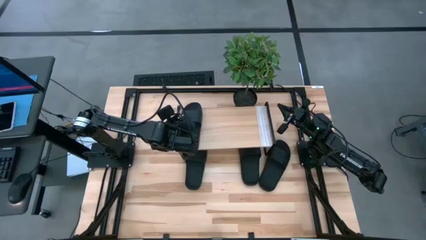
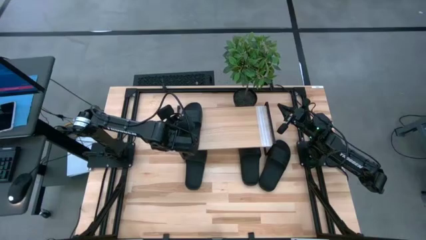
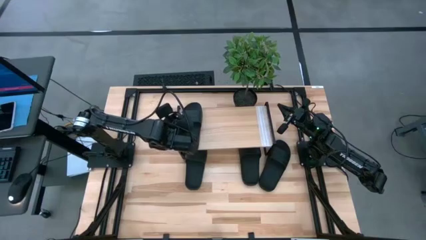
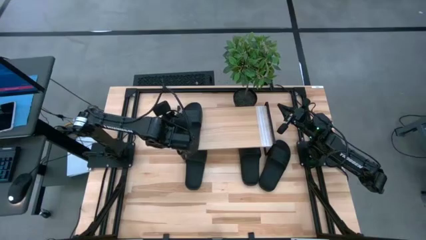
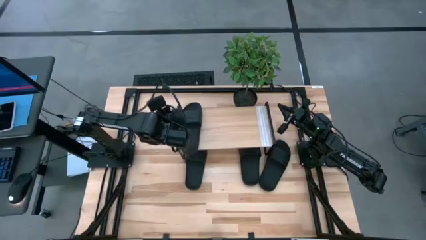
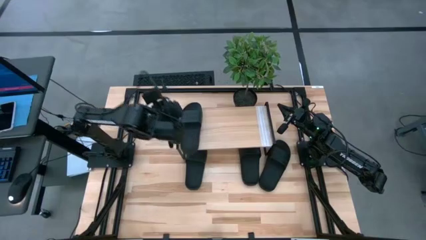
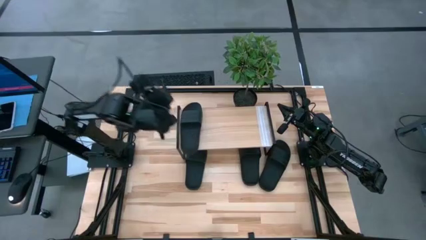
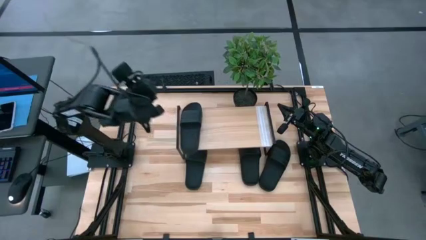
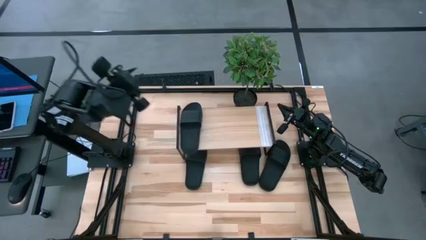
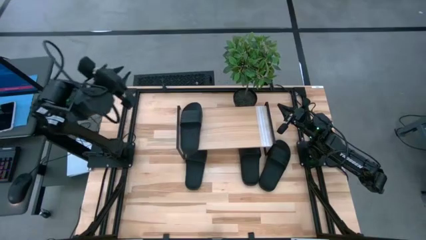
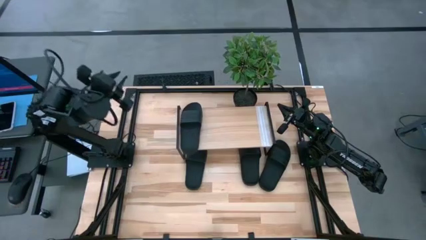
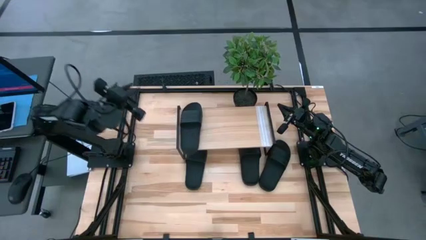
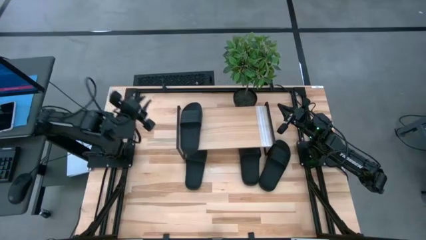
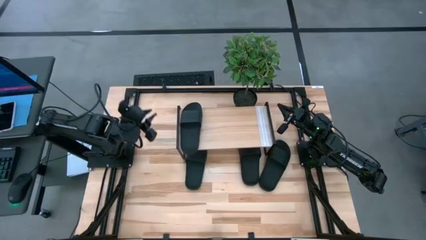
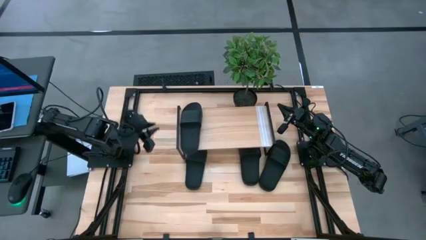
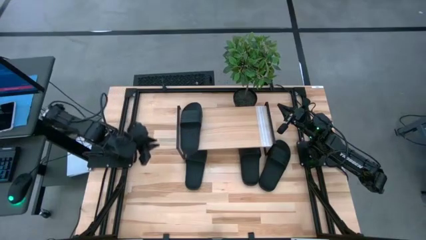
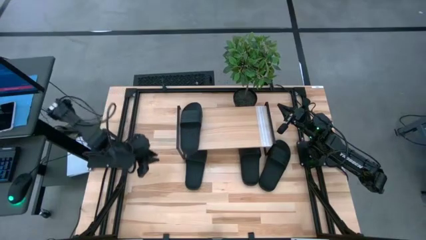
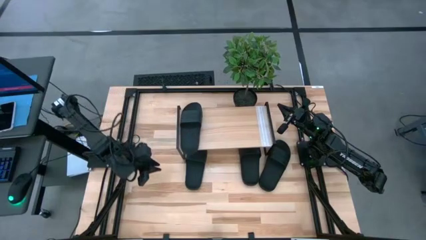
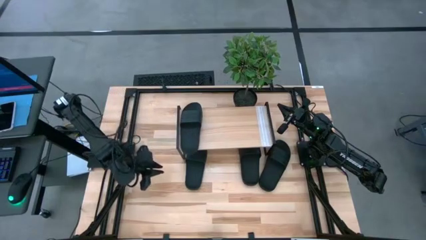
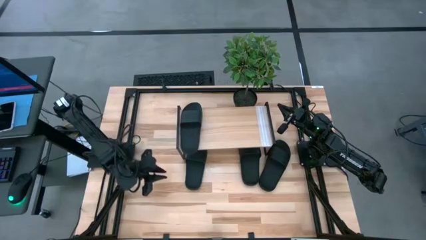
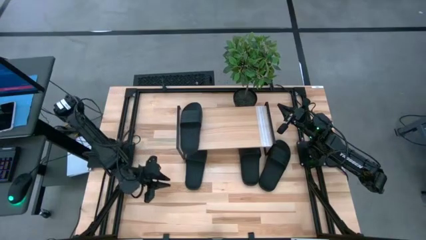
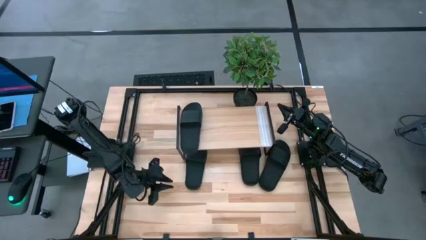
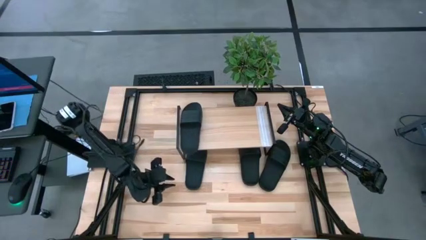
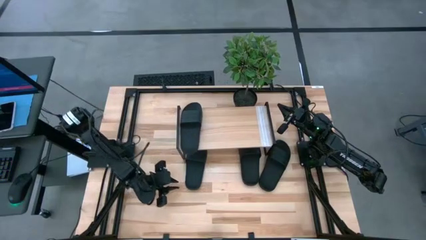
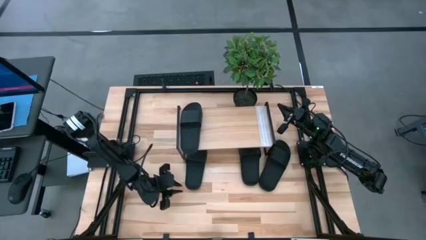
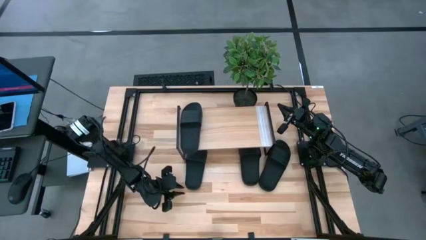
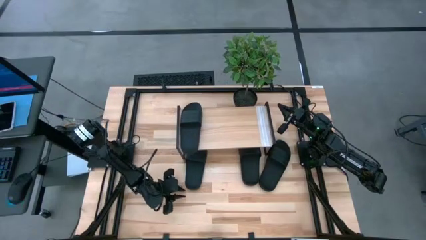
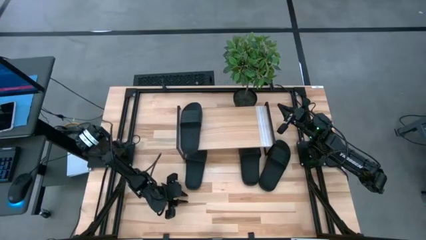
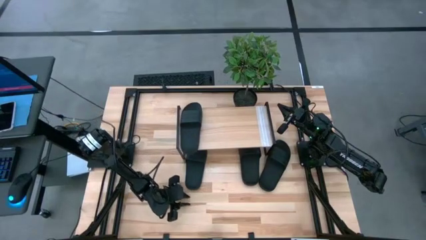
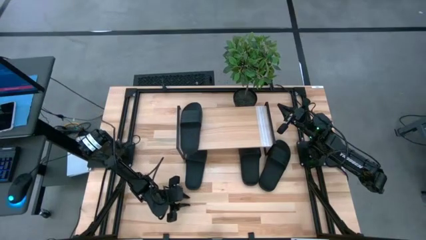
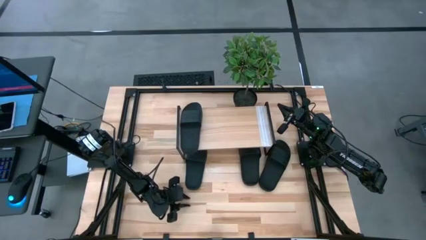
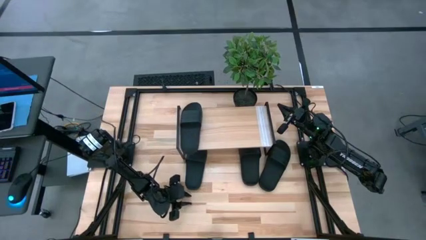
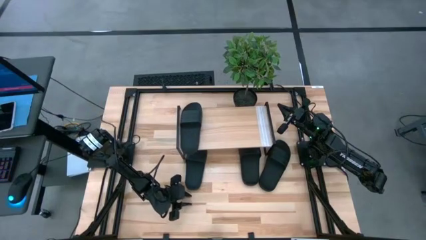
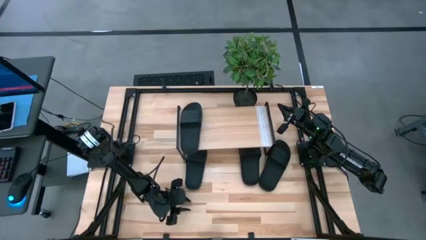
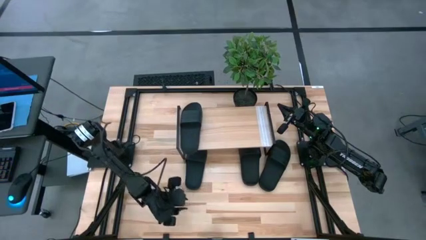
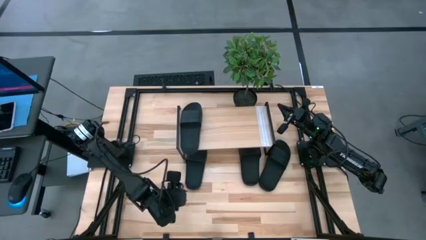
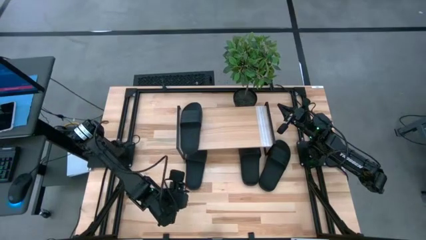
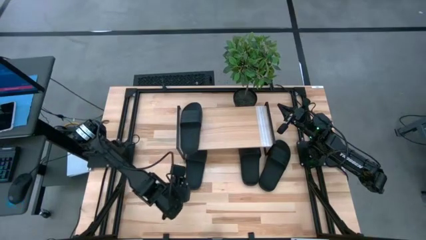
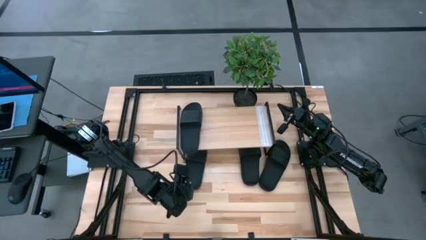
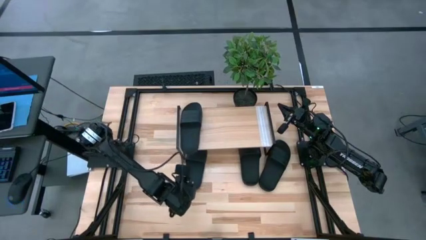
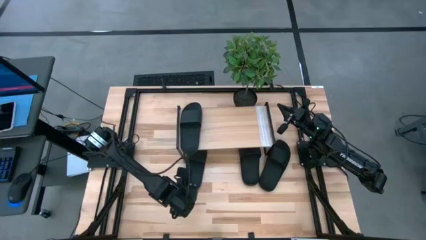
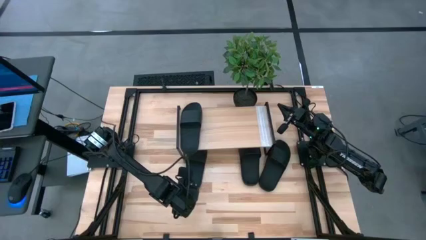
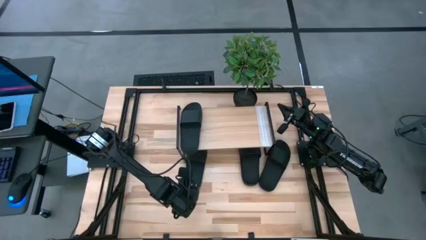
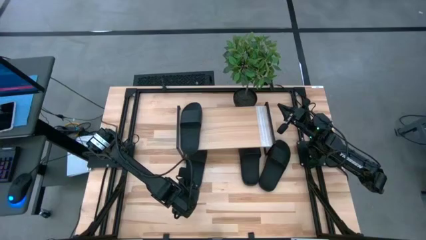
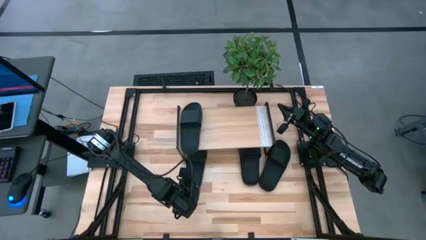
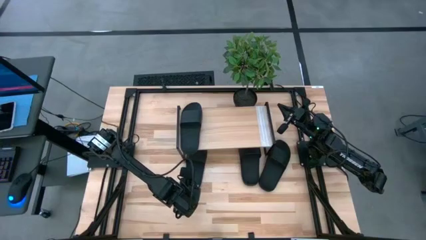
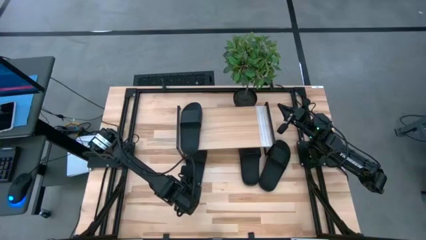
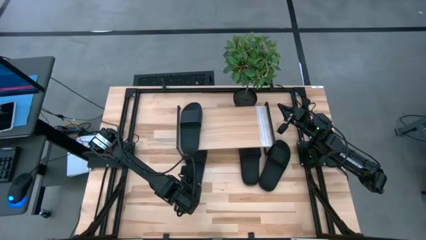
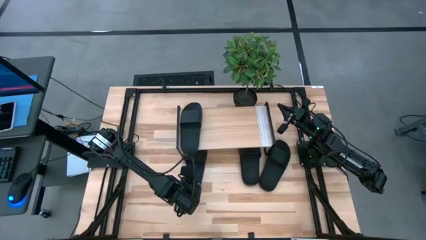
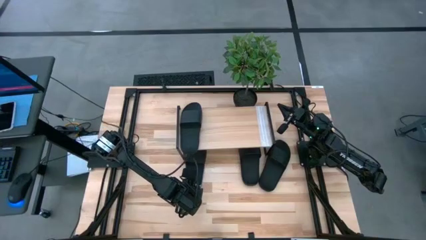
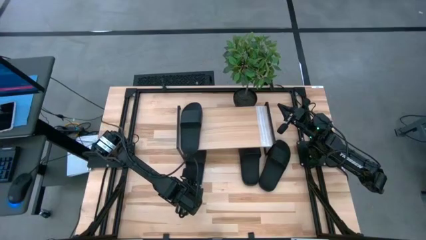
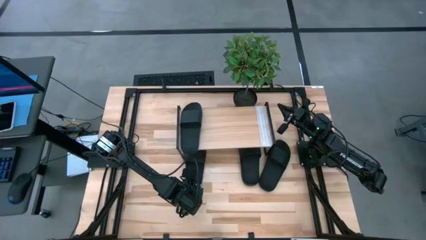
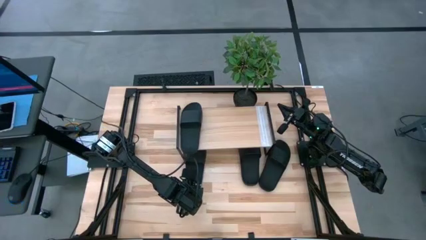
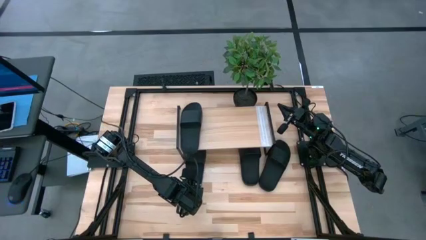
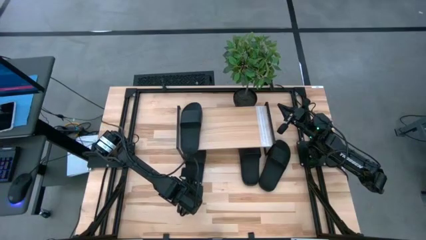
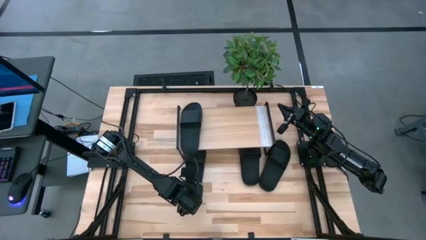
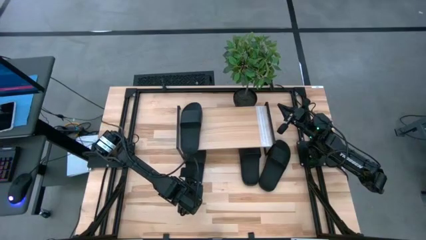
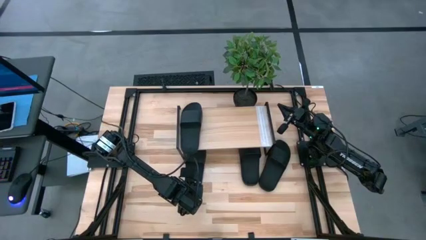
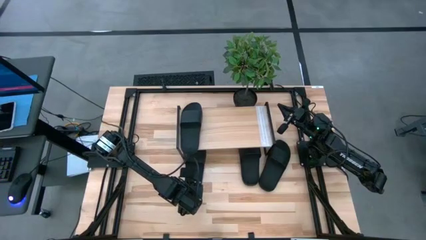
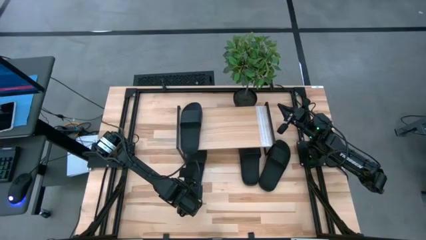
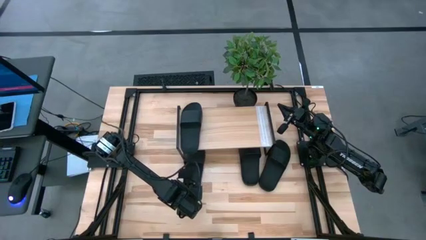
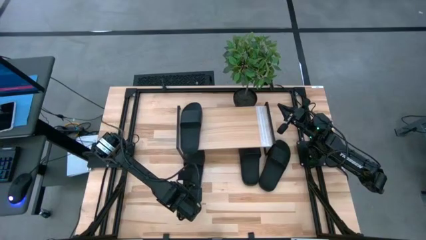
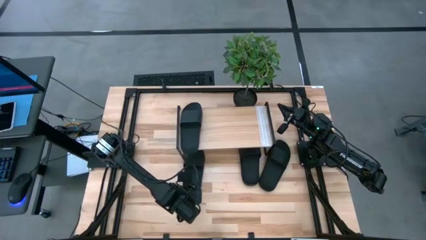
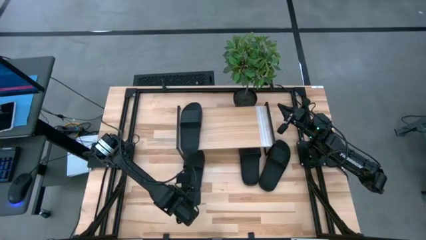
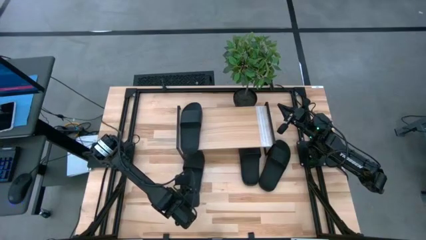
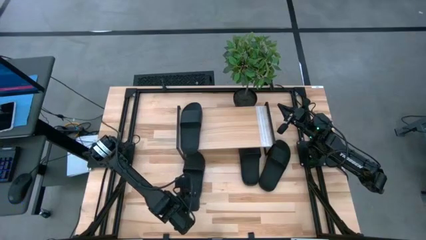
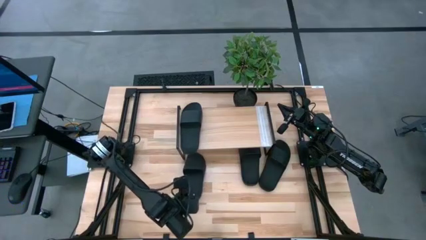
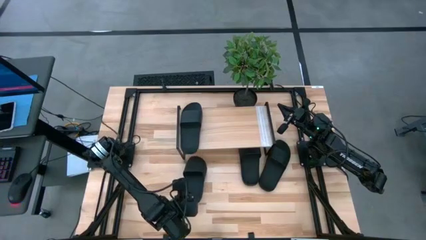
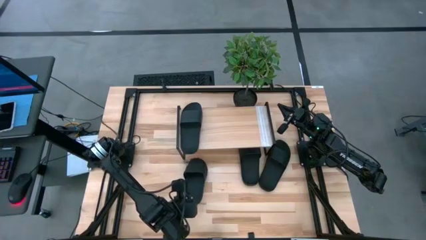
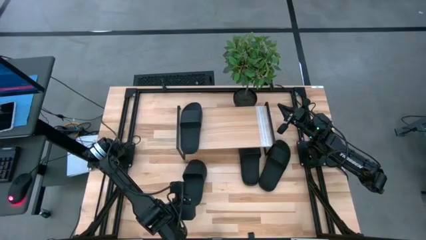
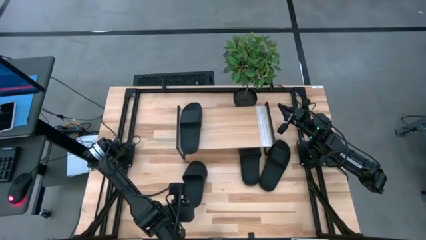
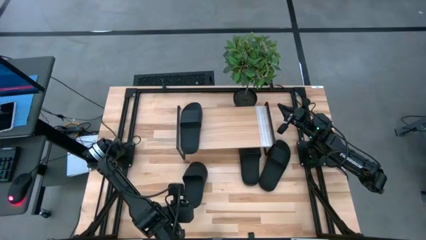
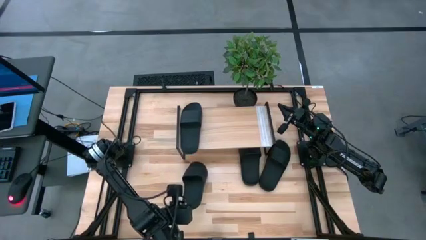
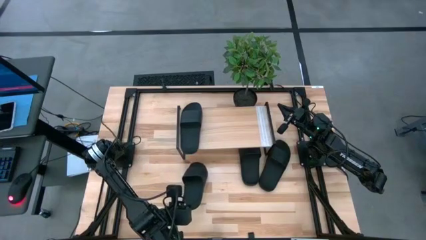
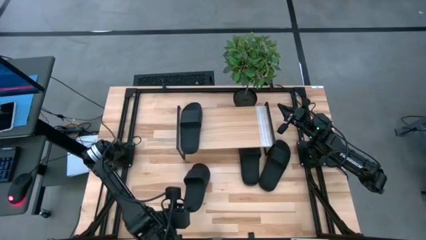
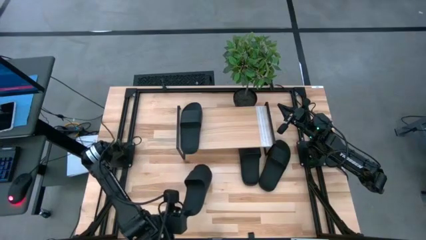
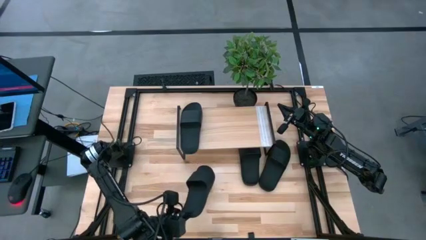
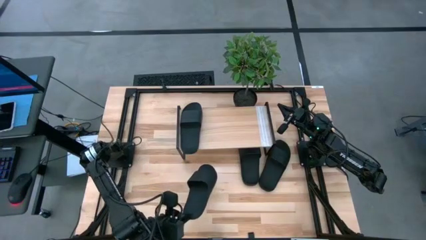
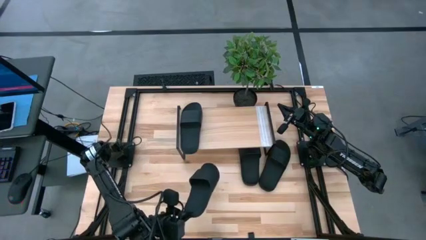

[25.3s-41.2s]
Task: Pick and place slides into the shelf
Put the black slide on the shelf
